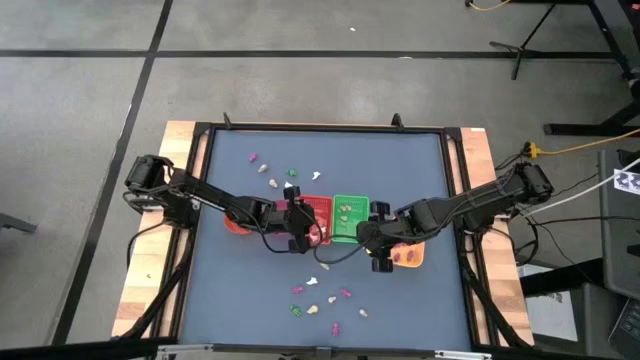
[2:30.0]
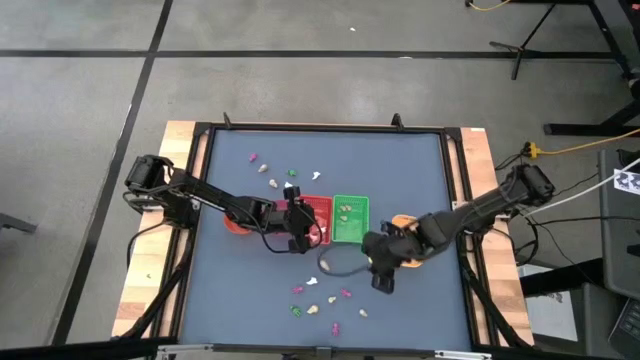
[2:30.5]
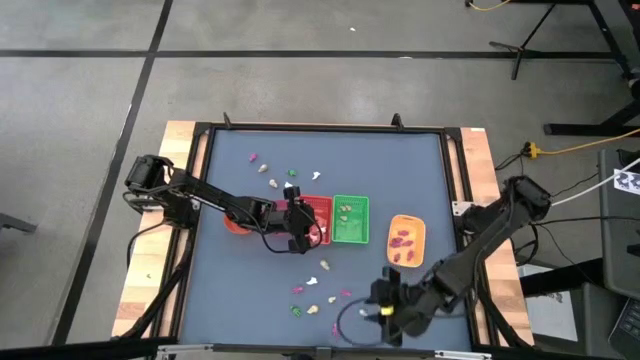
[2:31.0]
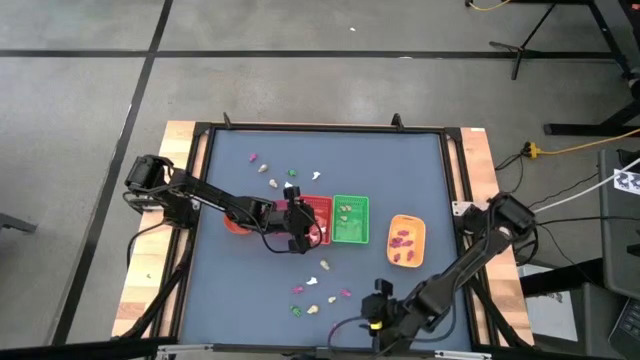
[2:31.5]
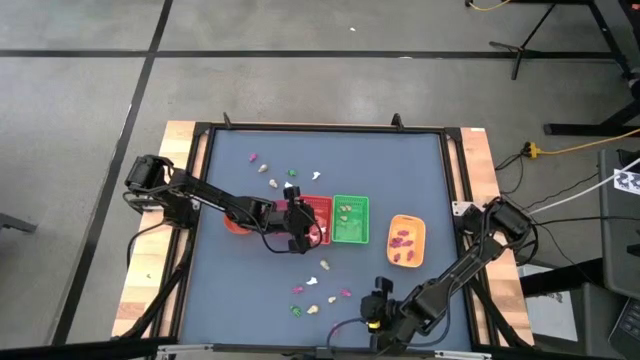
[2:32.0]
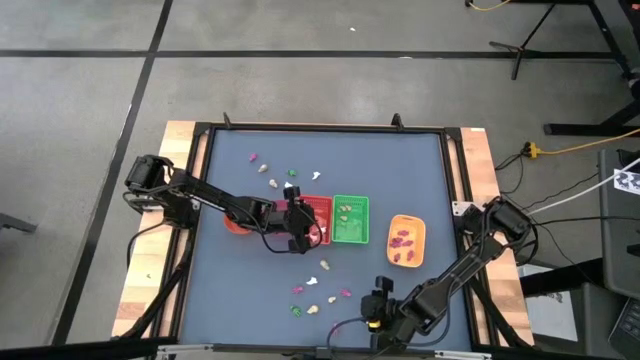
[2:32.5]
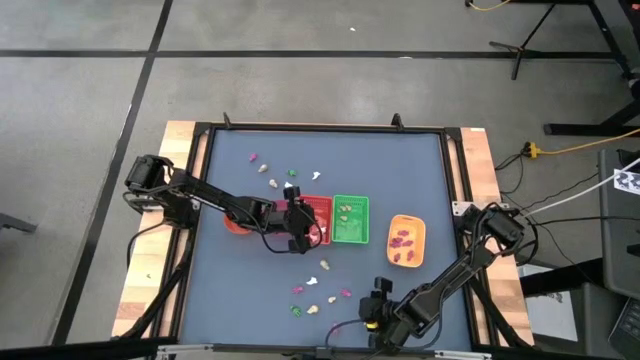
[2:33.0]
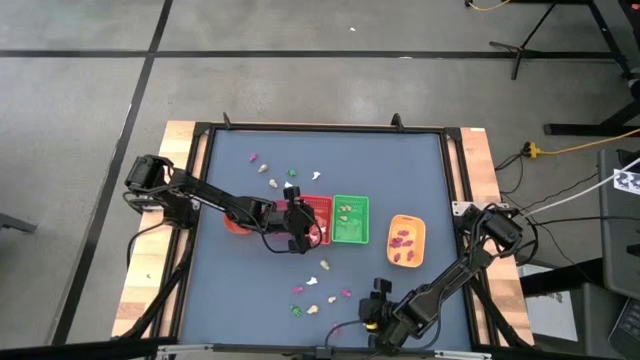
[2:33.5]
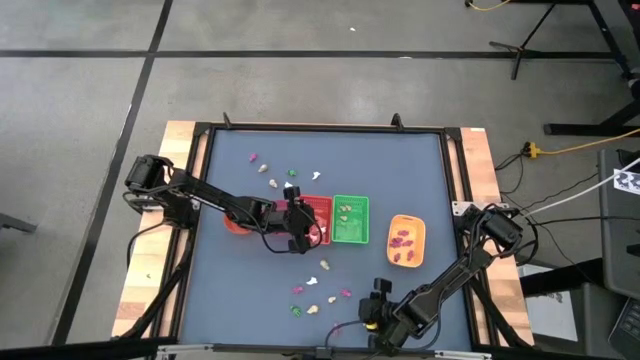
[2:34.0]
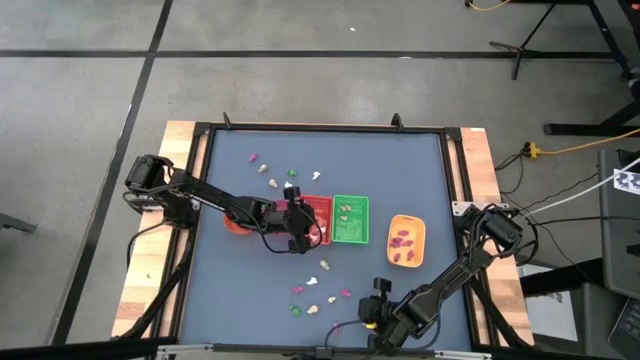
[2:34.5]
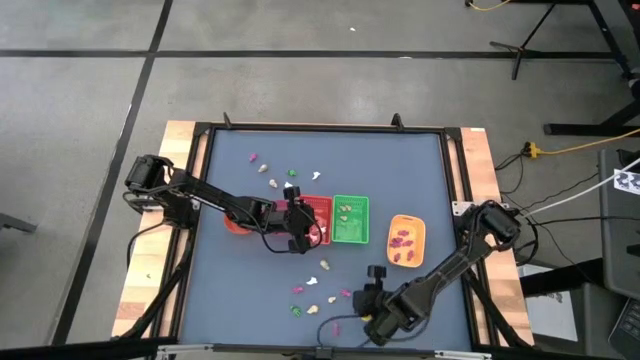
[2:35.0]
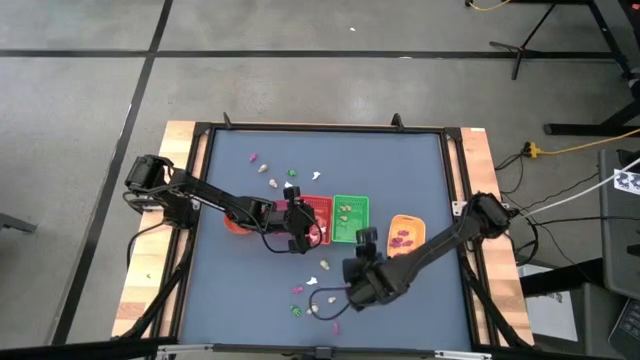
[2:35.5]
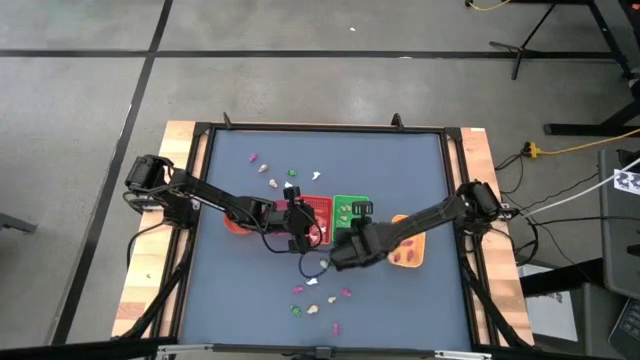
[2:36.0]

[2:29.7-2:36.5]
Task: Sort Halloween decoration
Put the yellow skull toy into the green bin

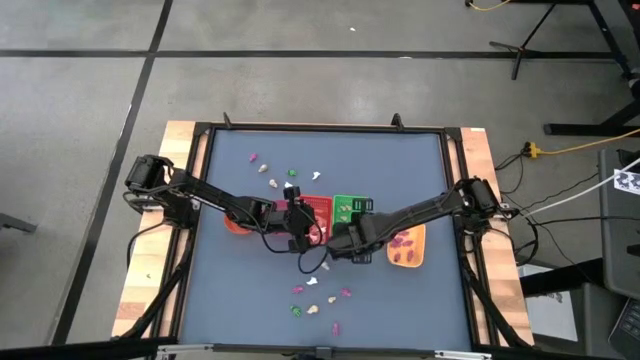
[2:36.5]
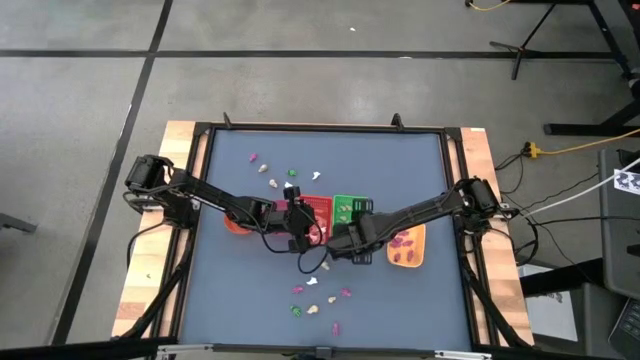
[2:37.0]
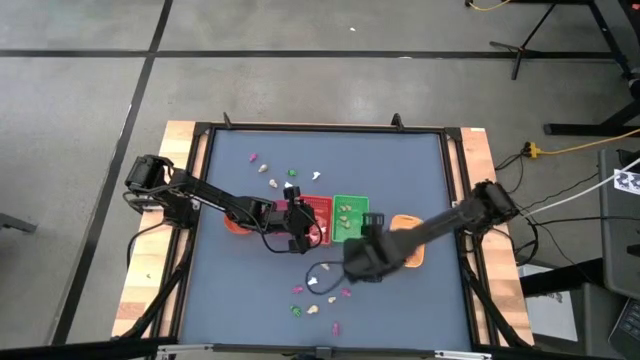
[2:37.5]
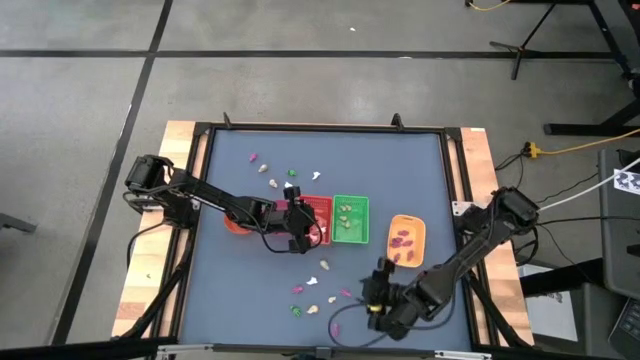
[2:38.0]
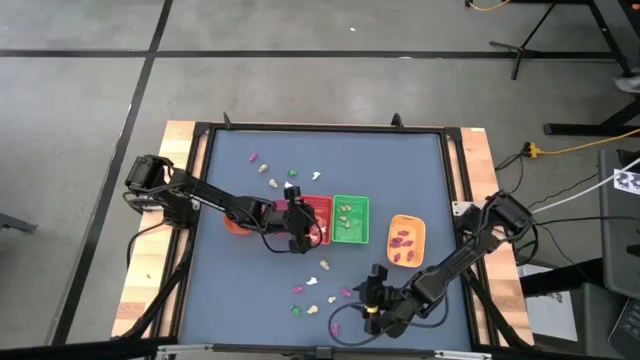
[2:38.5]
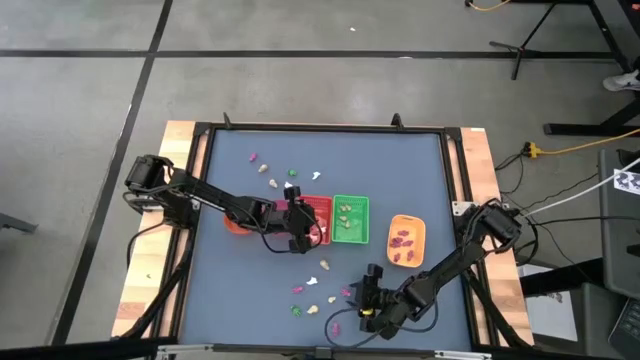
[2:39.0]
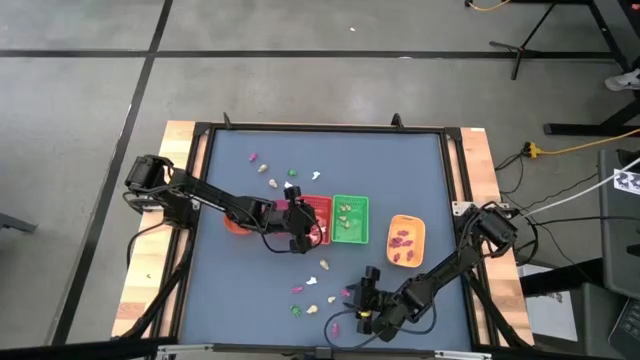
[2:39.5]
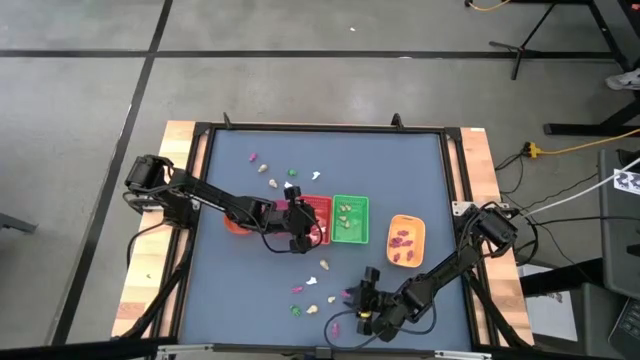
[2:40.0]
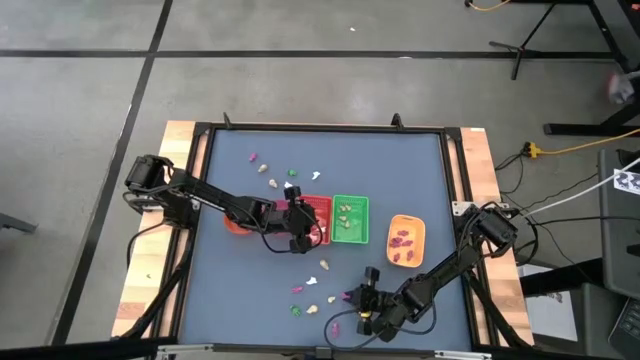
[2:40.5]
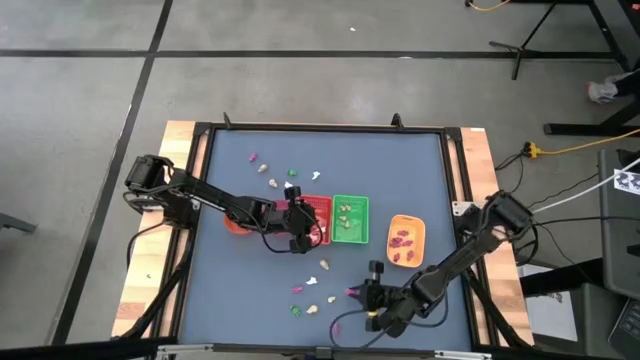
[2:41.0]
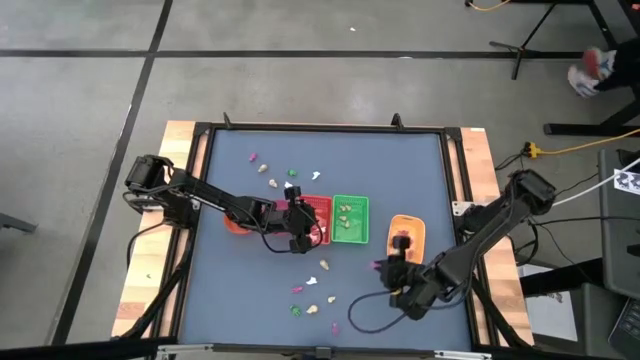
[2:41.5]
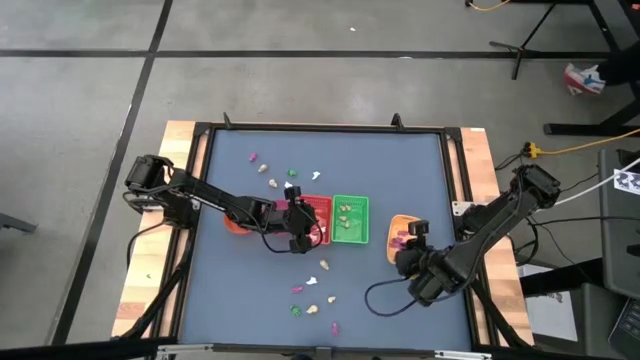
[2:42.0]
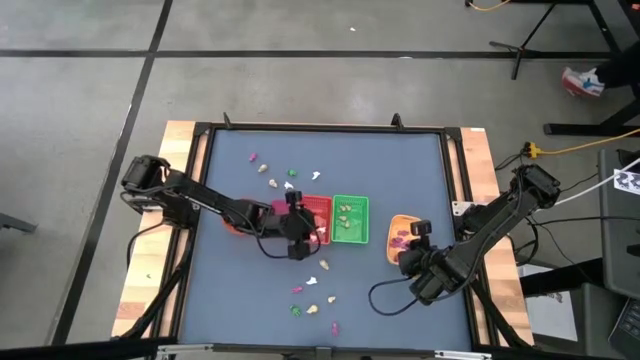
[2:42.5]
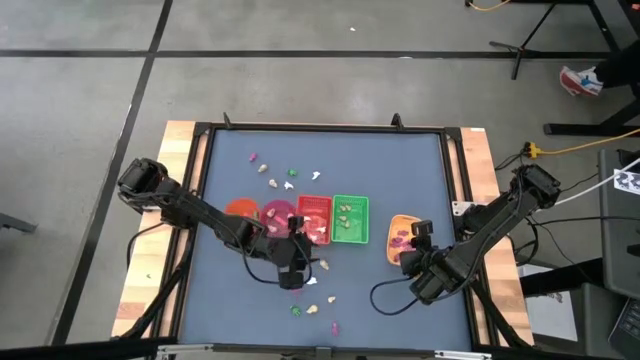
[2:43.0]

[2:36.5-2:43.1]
Put the pink skeleton toy into the yellow bin

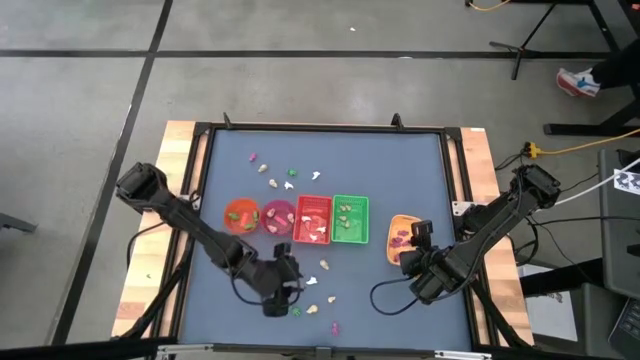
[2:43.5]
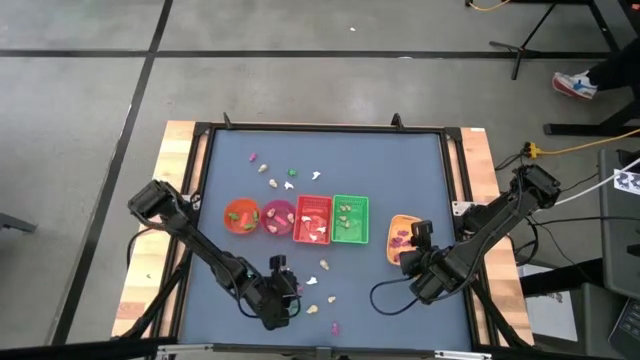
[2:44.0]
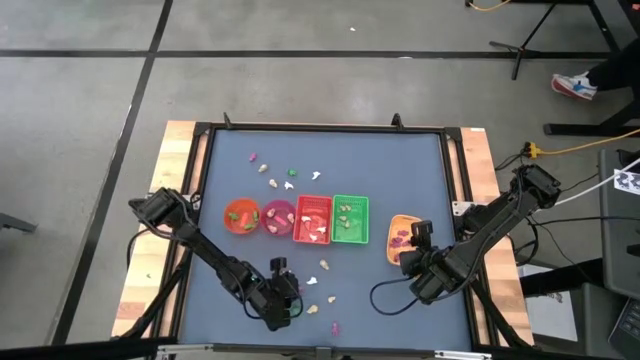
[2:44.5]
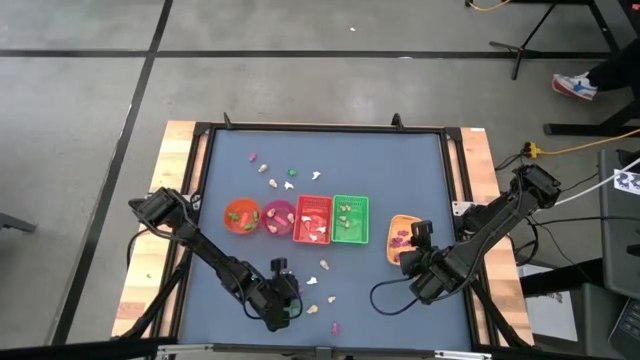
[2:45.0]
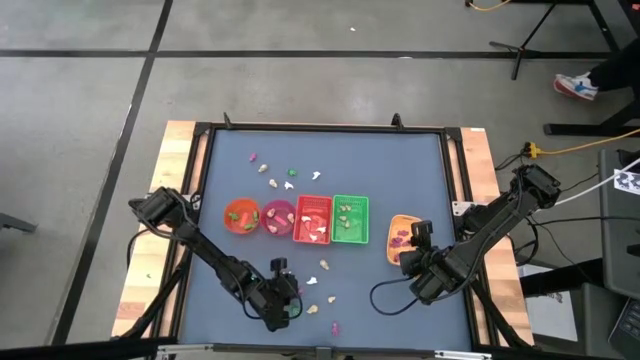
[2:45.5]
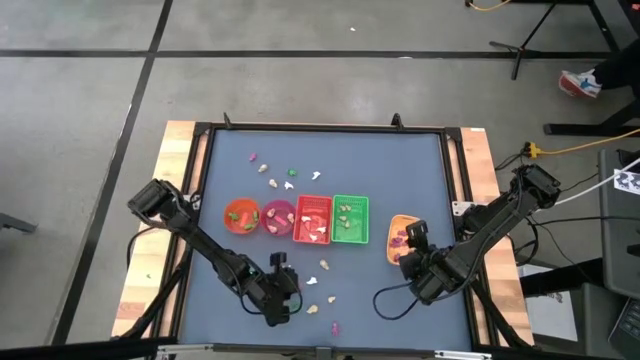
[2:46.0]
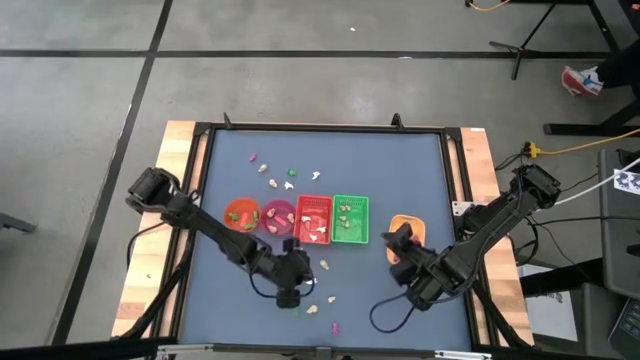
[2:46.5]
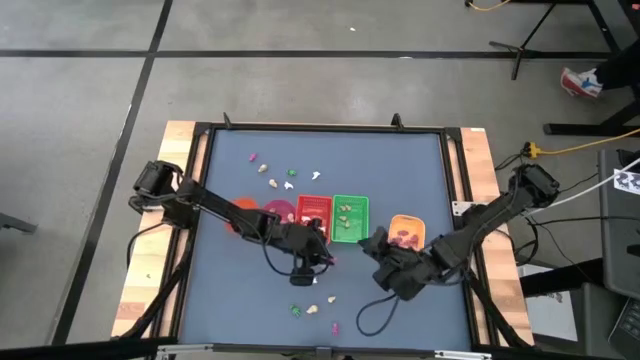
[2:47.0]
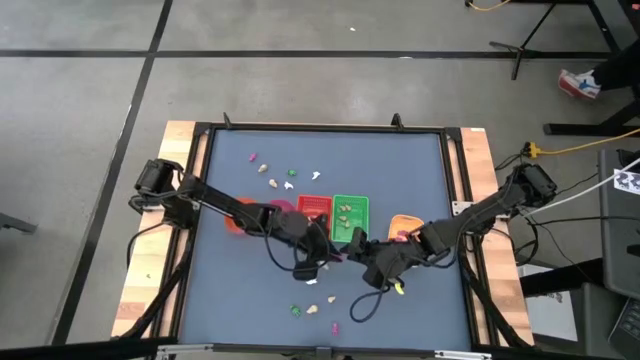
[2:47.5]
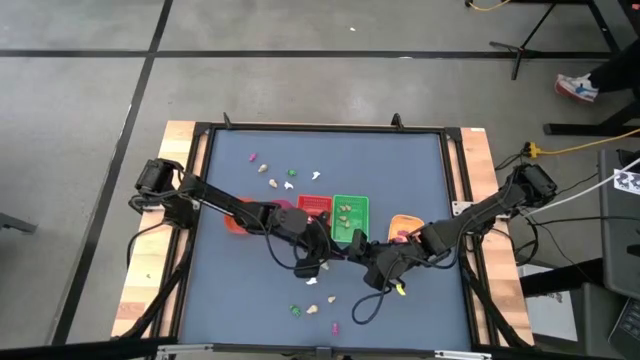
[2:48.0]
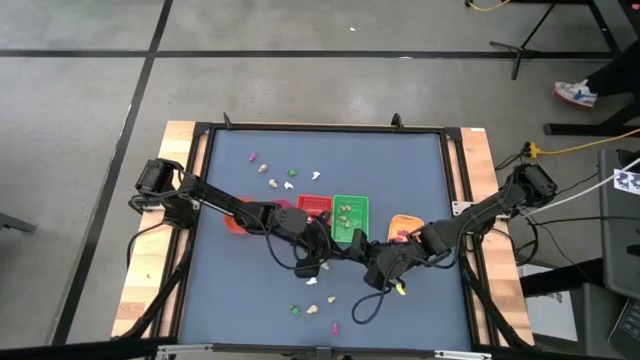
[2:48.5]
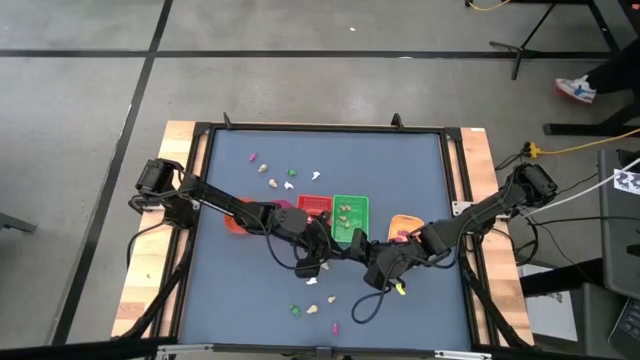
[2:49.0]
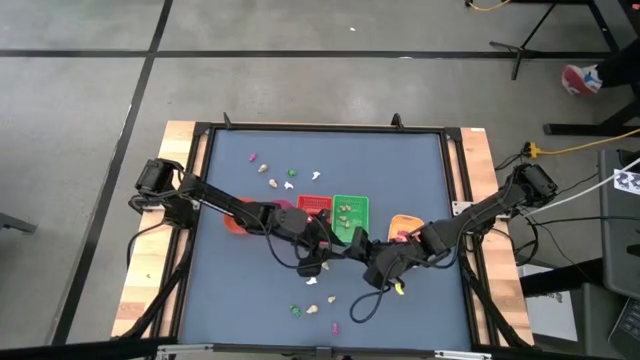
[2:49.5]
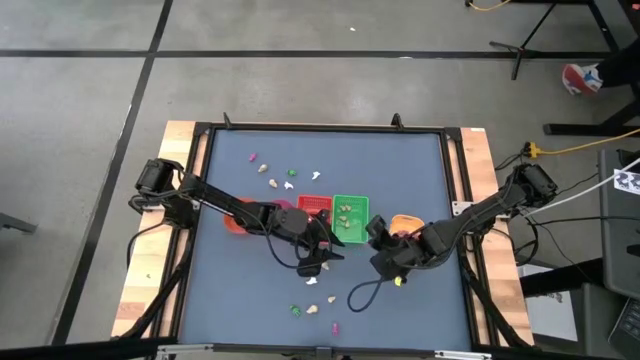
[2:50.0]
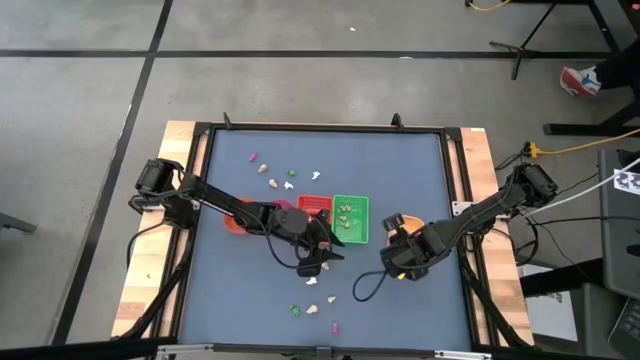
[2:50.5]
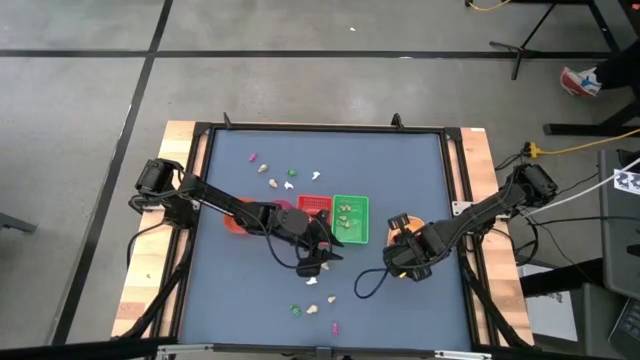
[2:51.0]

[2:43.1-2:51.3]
Put the pink skeleton toy into the yellow bin
